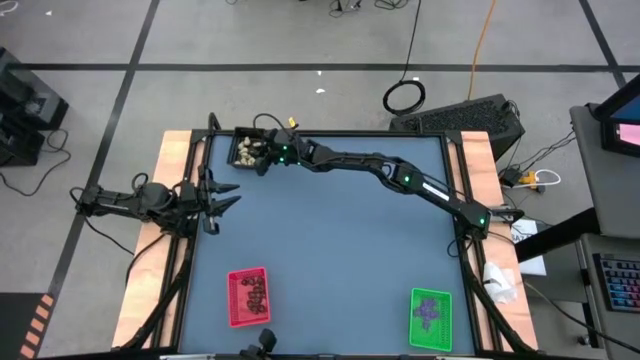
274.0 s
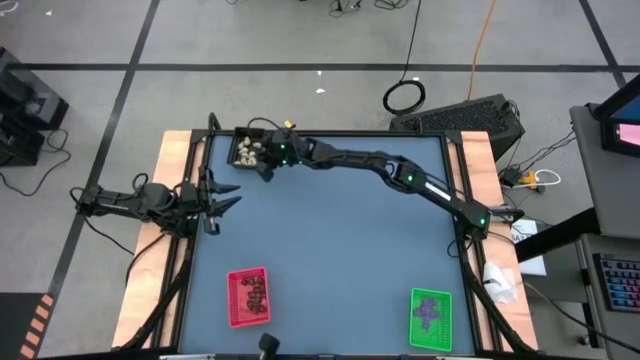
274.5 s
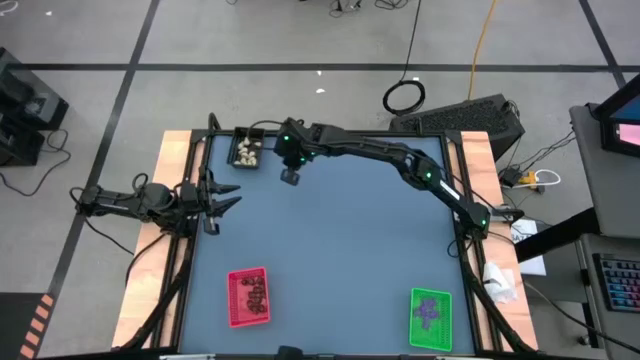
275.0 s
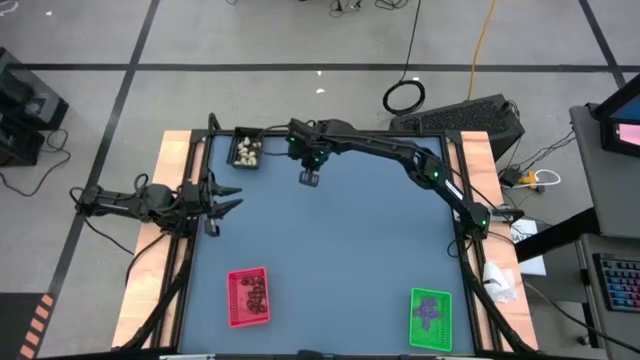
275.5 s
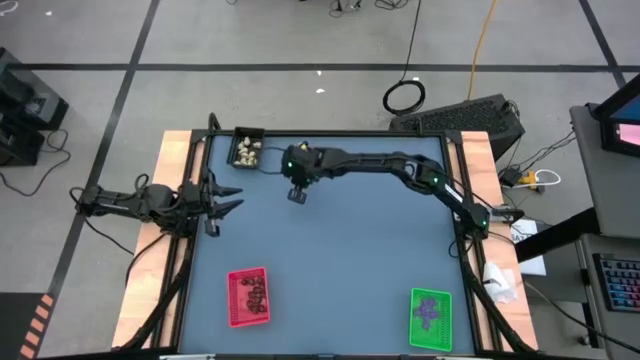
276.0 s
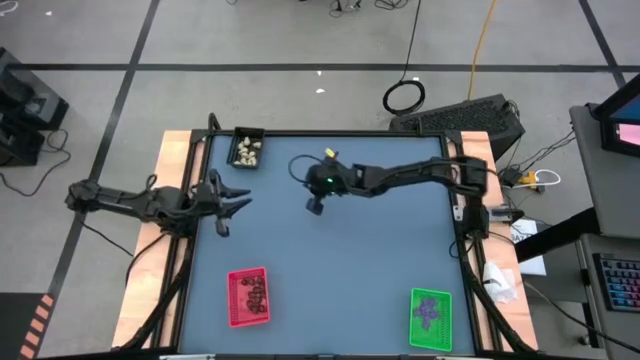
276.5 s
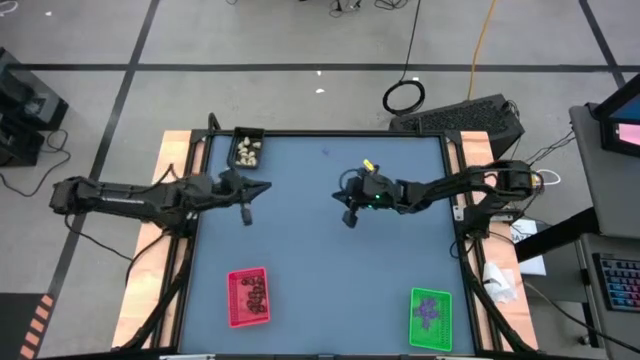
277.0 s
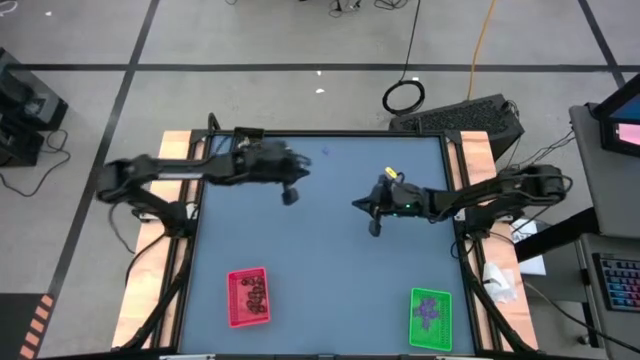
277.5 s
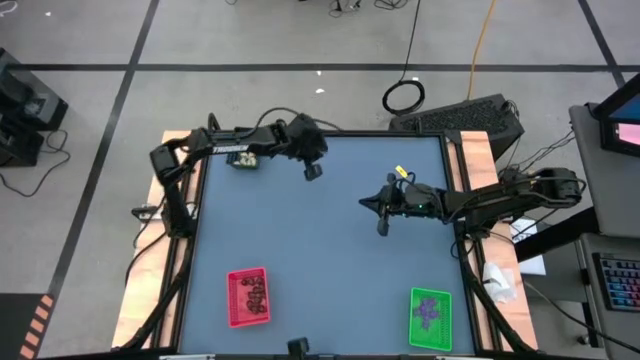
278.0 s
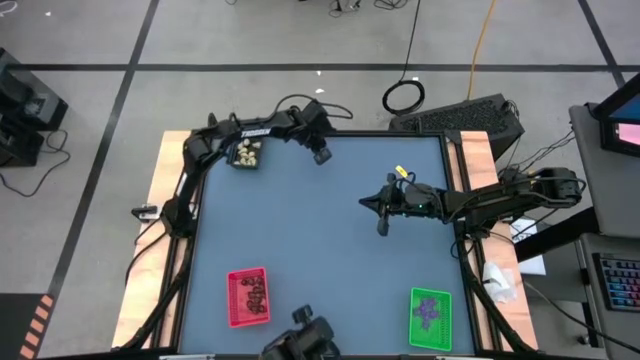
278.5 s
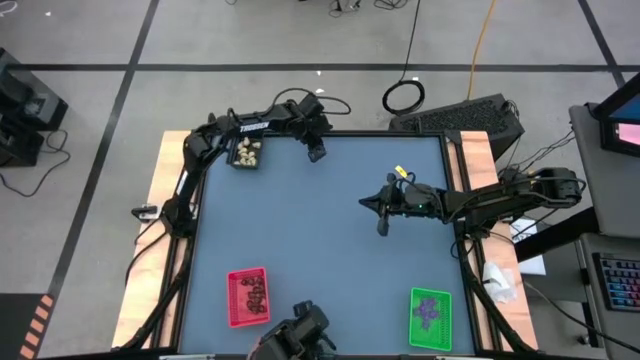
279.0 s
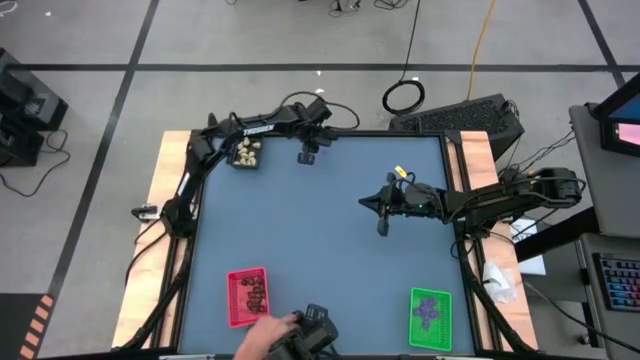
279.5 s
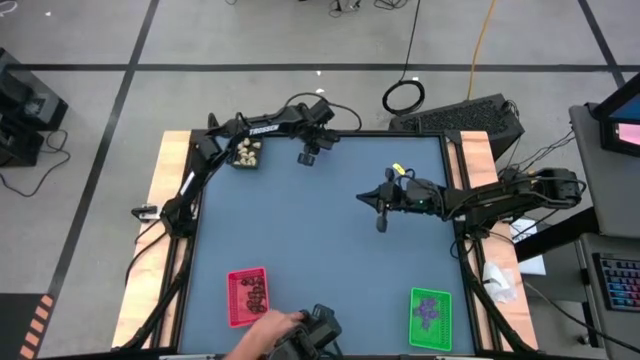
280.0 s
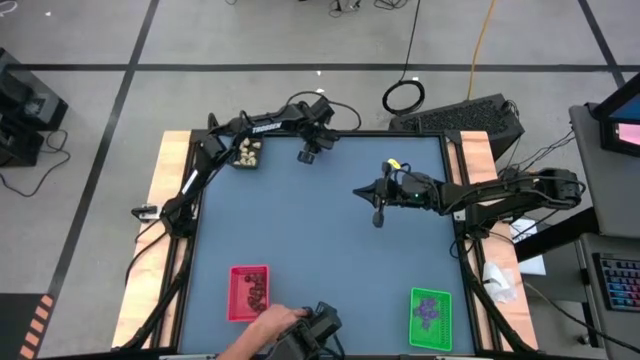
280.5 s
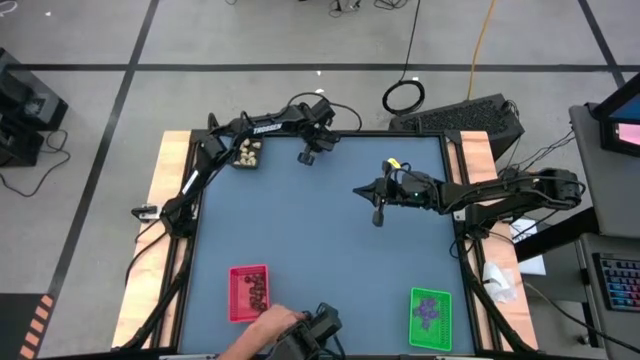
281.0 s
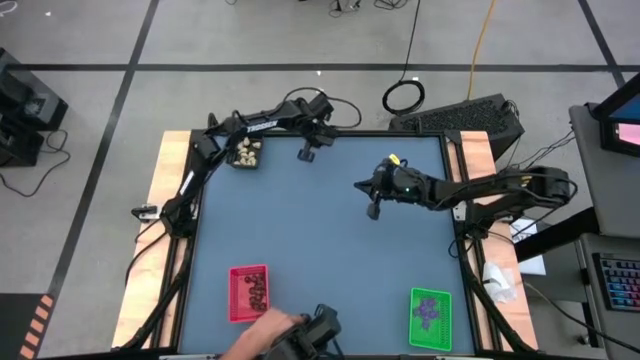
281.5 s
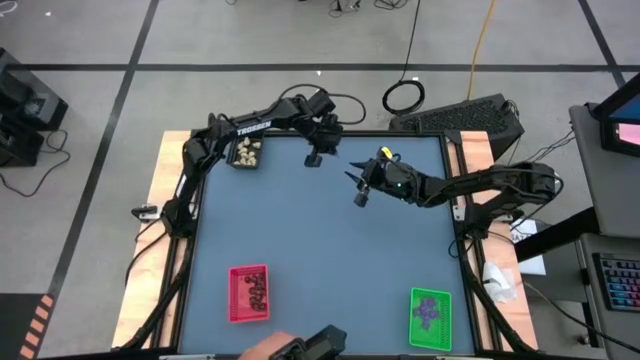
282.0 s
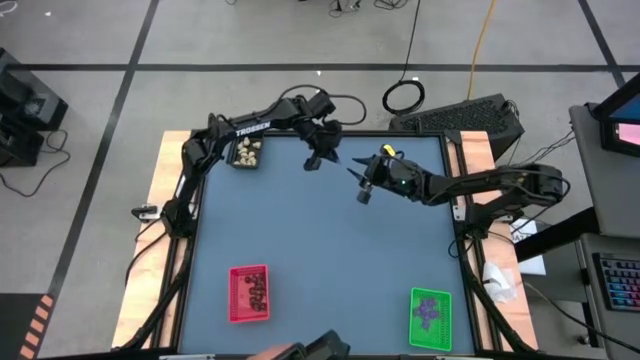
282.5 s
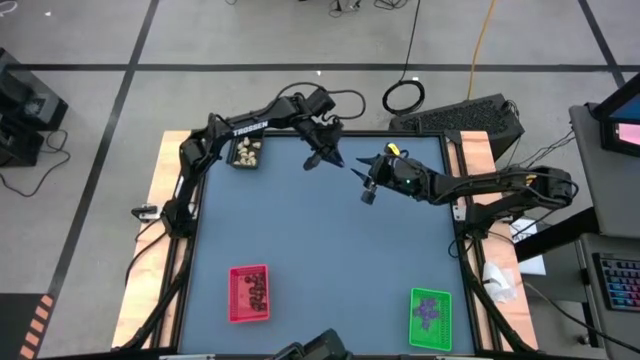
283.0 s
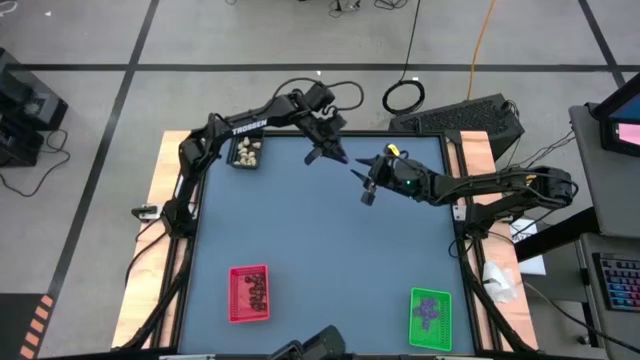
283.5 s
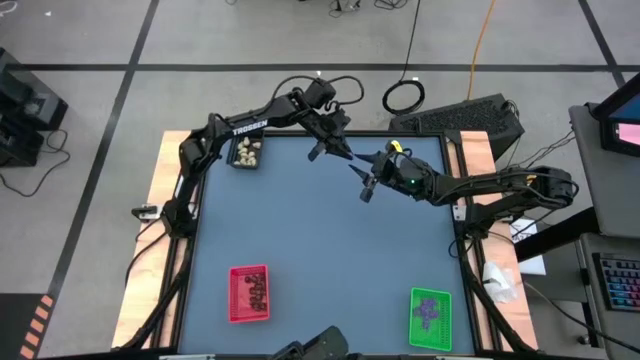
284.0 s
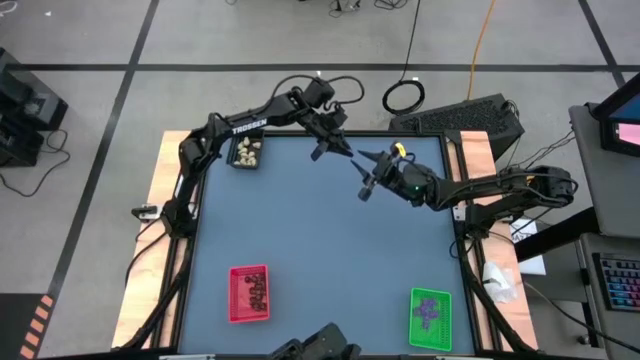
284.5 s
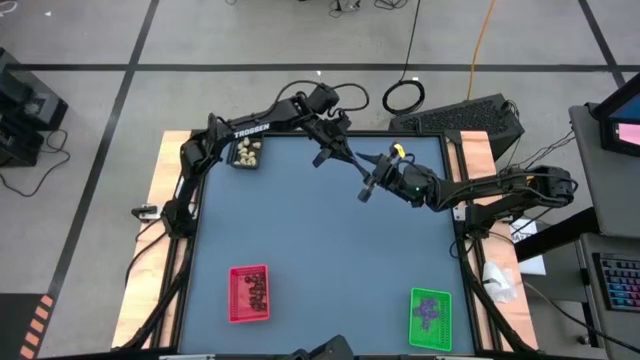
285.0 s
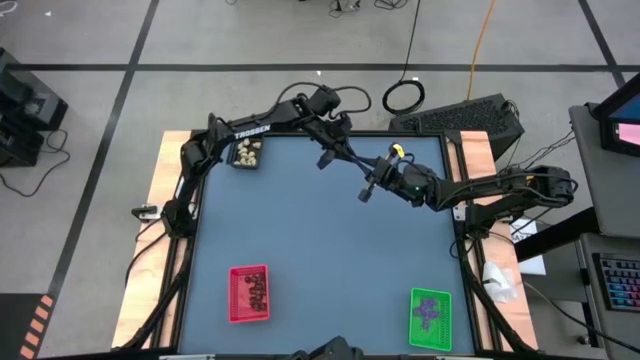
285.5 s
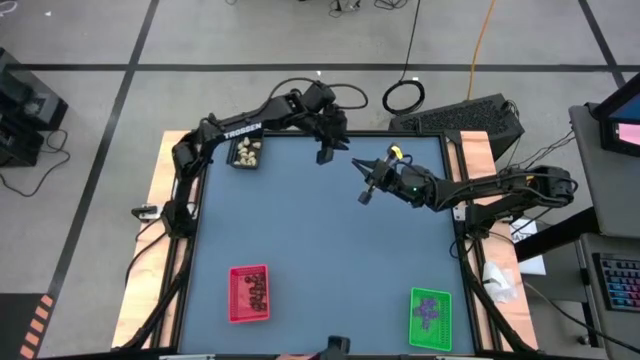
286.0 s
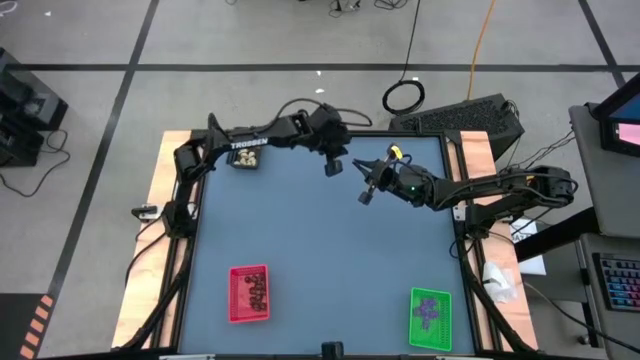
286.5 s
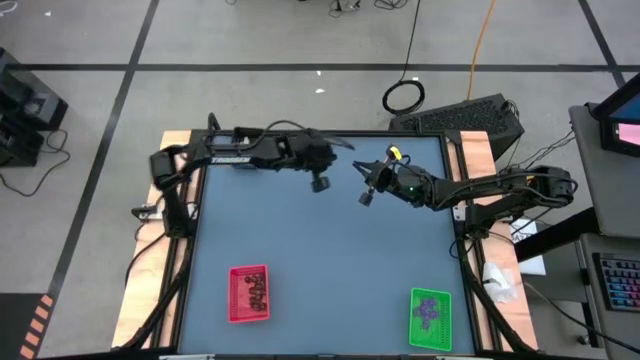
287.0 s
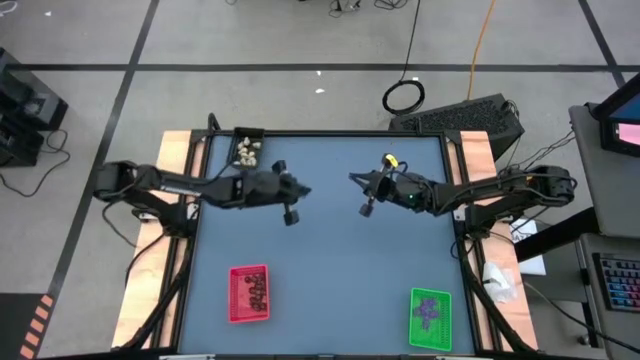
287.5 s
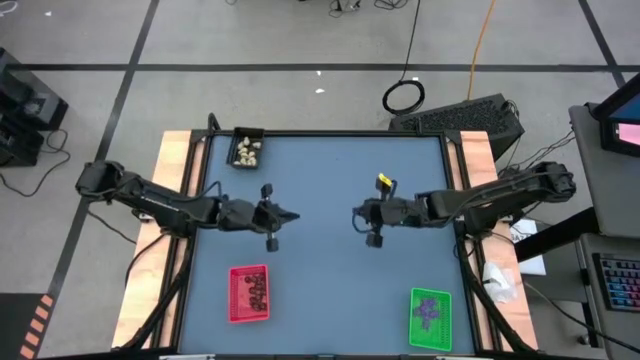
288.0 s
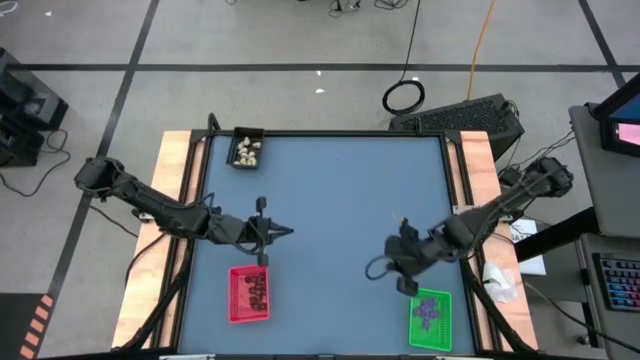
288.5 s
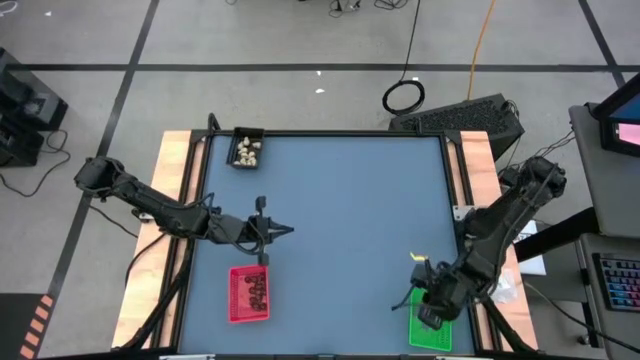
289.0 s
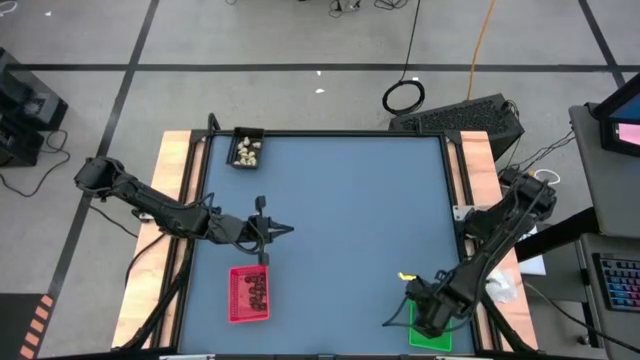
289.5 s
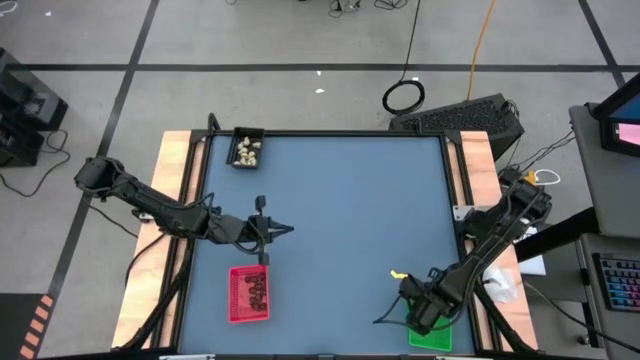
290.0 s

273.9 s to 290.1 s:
Task: Sort Halloween decoration
Put the violet spider toy into the green bin

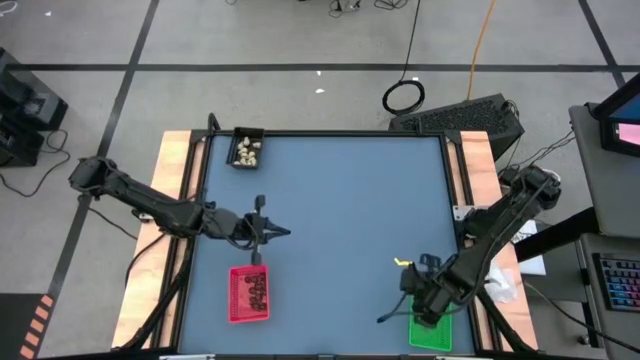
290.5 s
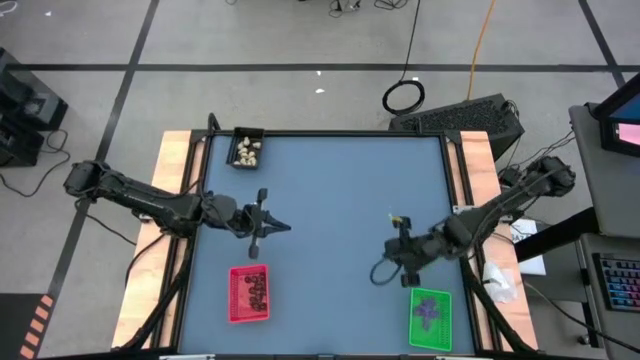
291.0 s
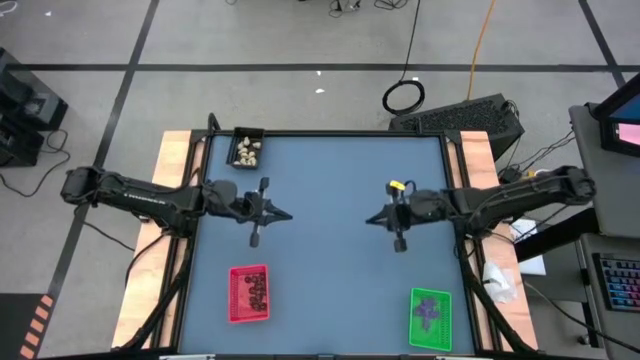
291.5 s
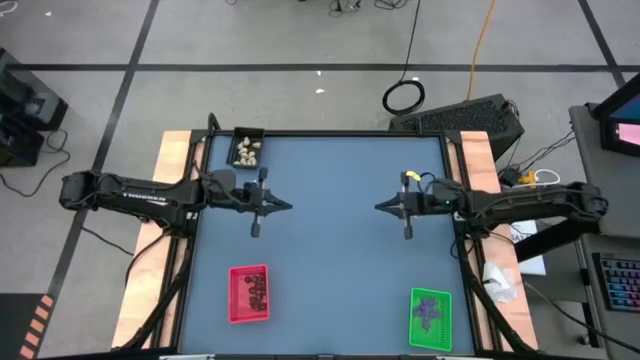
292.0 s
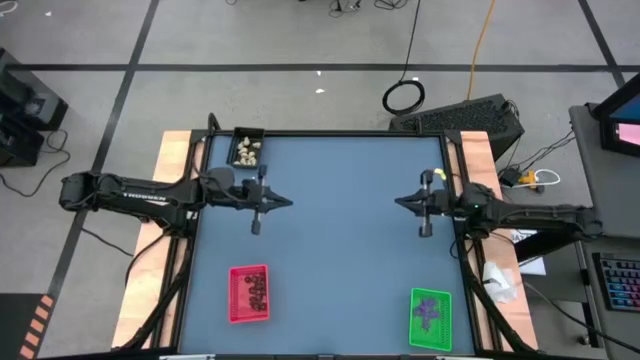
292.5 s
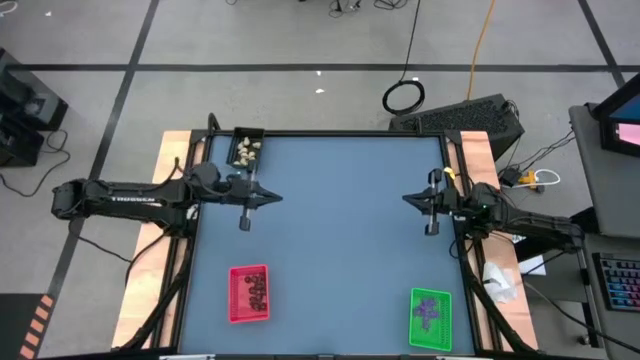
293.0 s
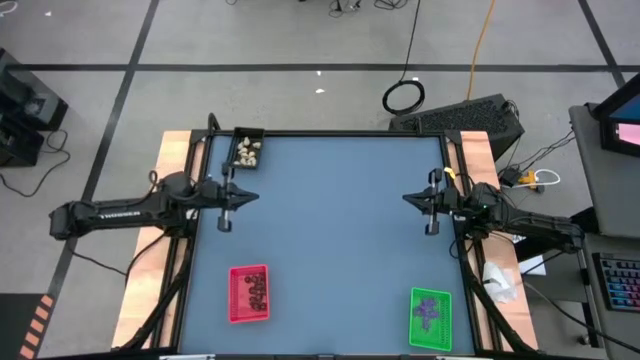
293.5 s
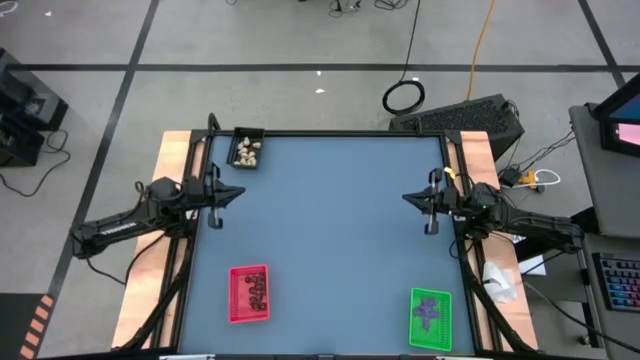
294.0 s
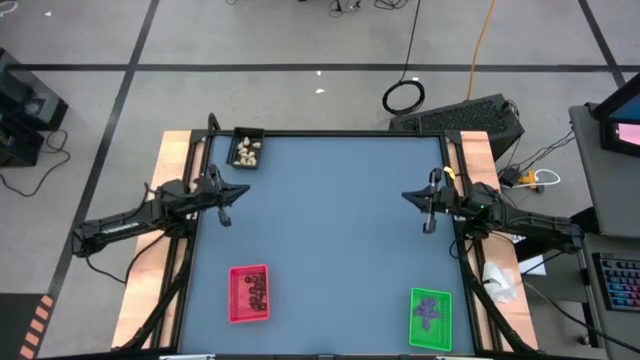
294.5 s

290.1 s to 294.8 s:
Return to Home Position
